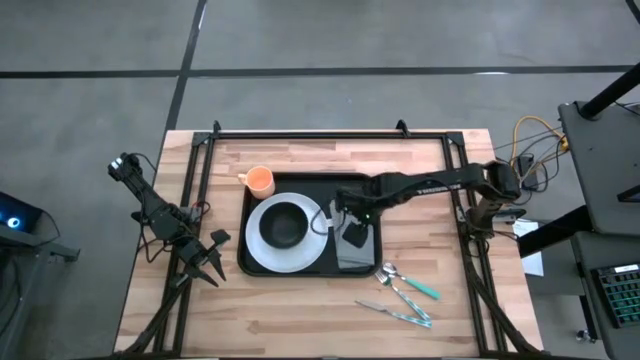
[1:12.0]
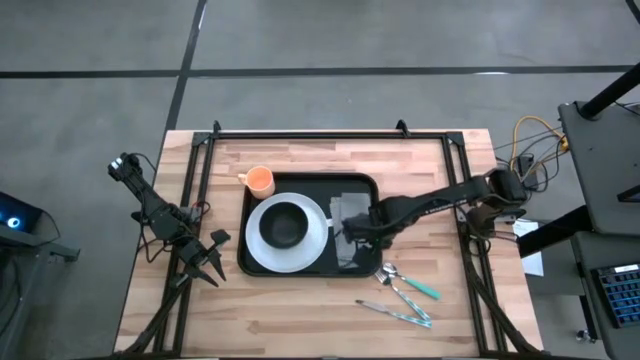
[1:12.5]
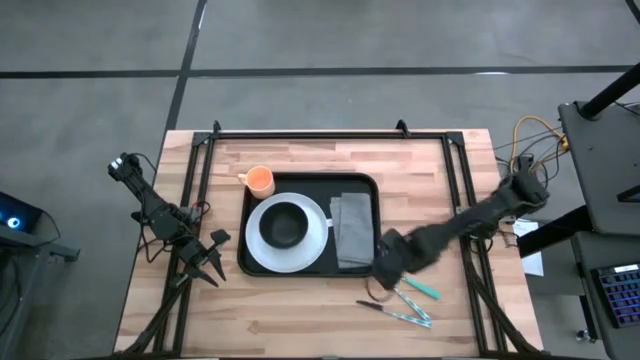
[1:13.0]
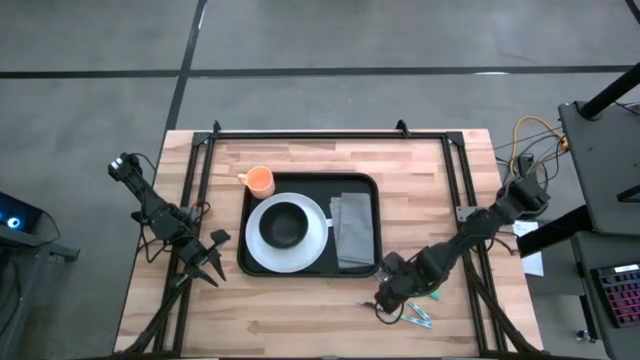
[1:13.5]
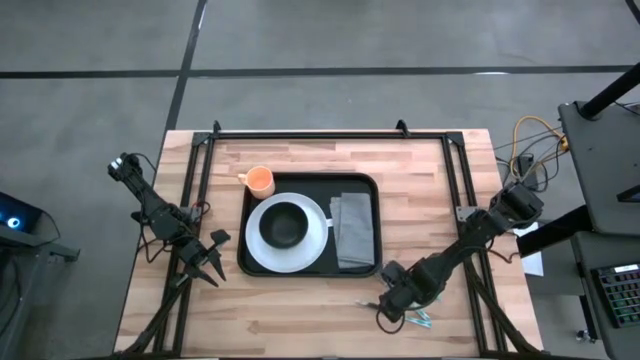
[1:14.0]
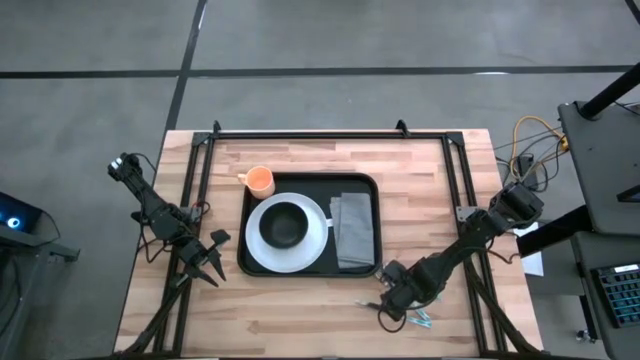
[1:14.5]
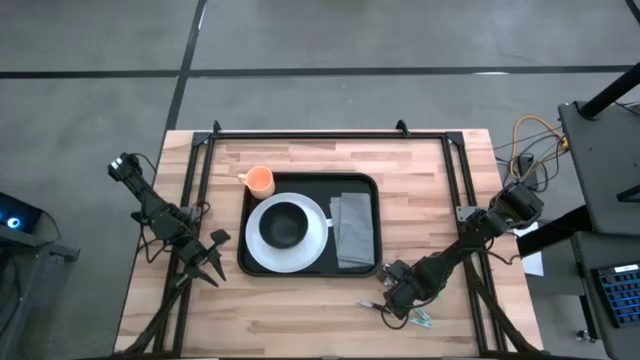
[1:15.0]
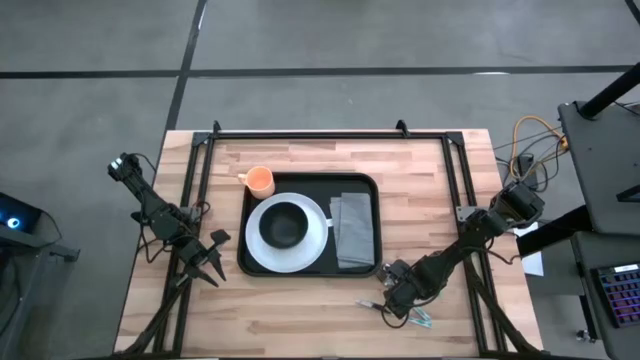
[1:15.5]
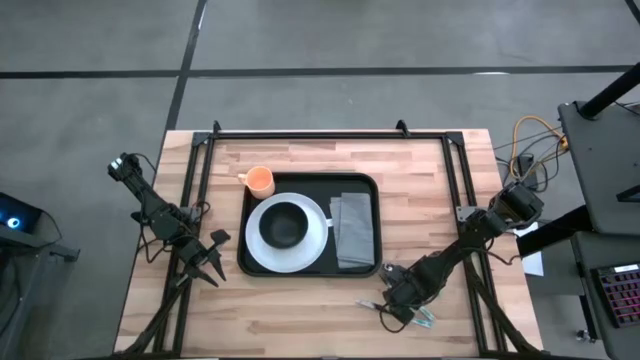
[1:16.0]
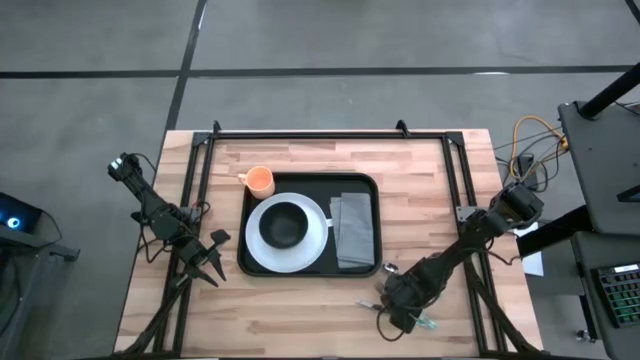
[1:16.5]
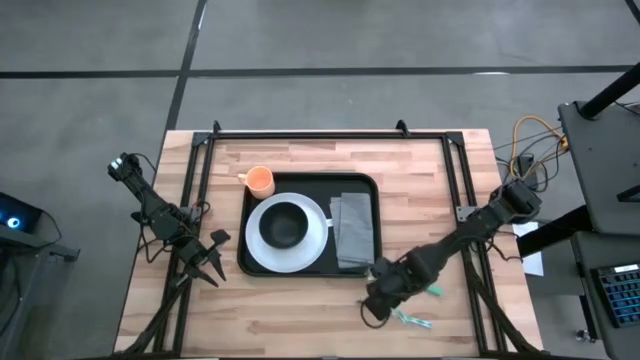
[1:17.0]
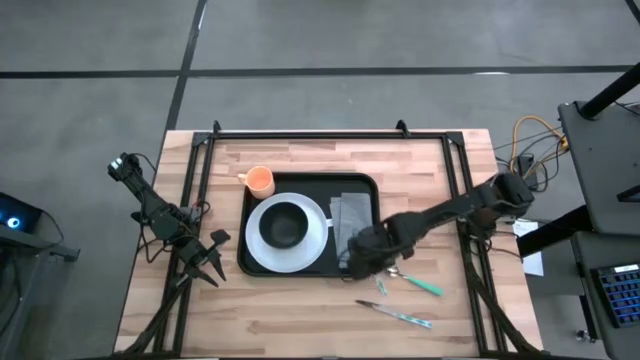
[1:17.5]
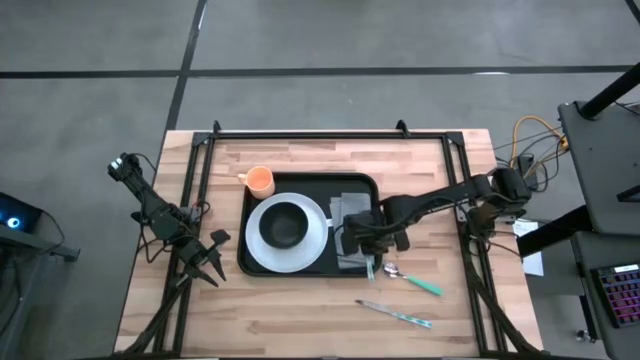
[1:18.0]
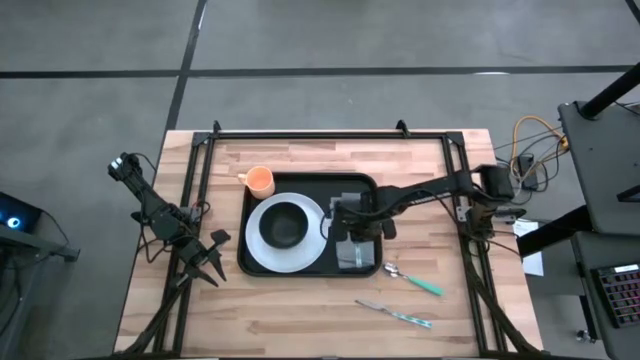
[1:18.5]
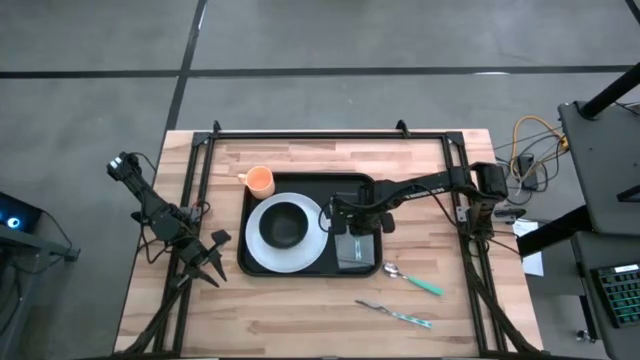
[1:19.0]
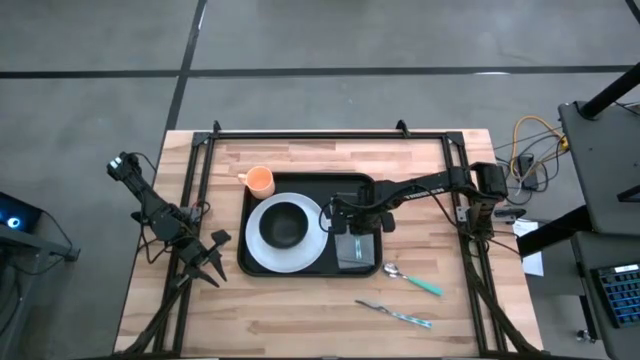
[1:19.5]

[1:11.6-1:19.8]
Task: Set up tray
Put the fork on top of the napkin in the serving tray

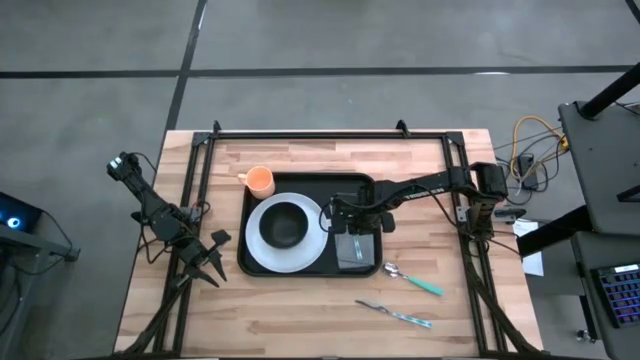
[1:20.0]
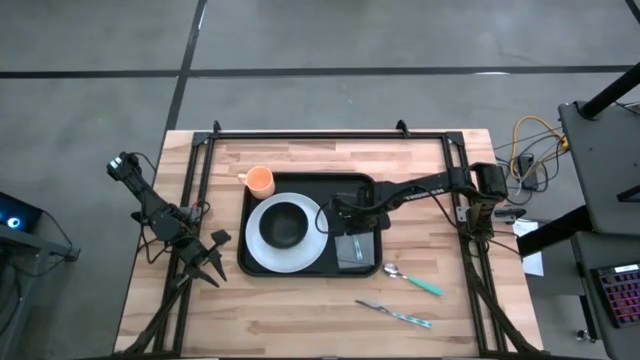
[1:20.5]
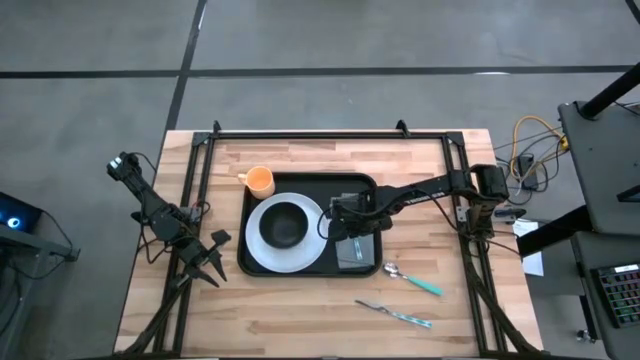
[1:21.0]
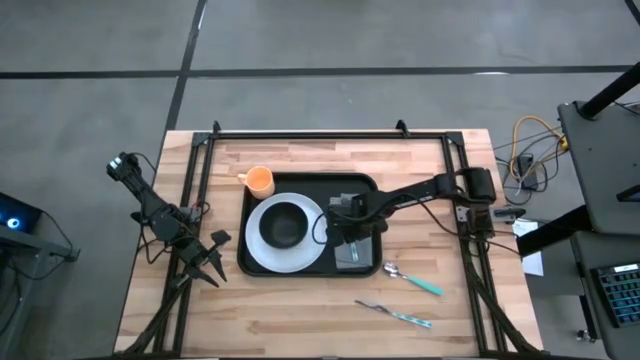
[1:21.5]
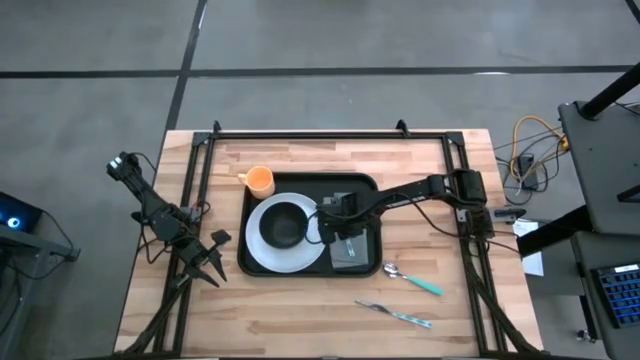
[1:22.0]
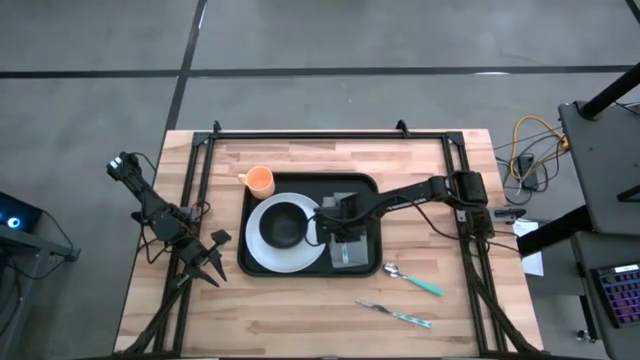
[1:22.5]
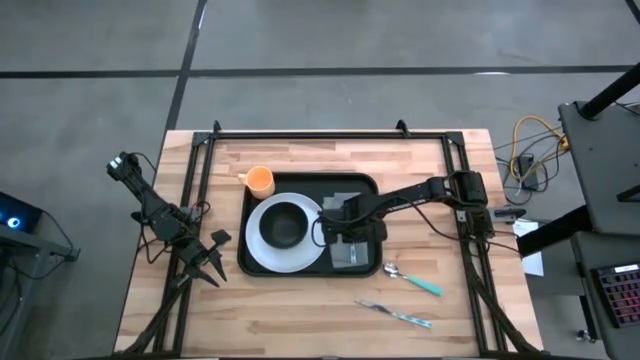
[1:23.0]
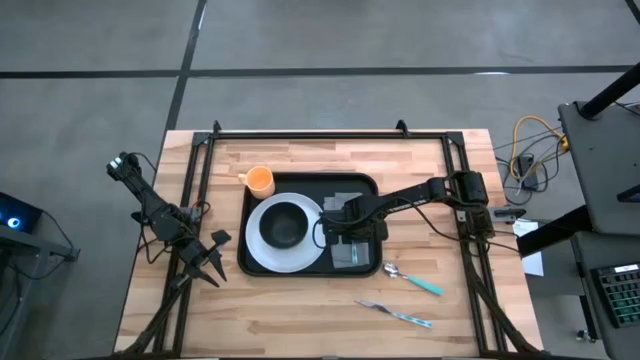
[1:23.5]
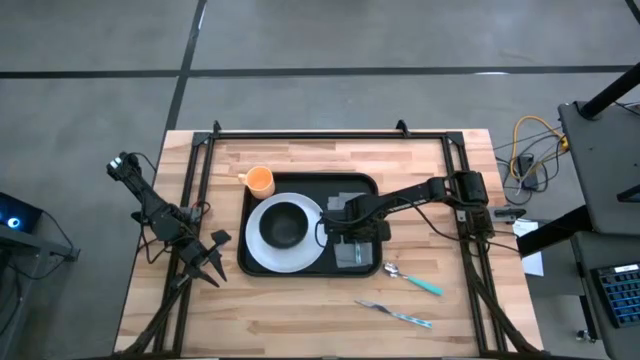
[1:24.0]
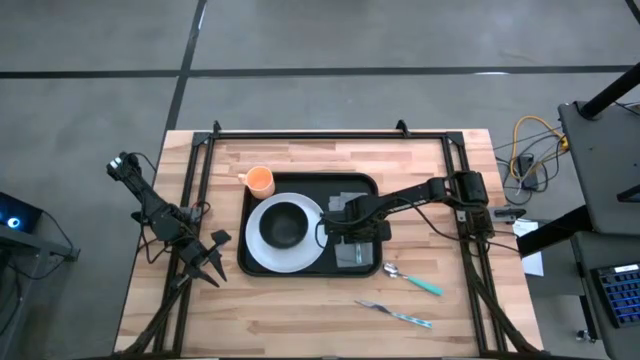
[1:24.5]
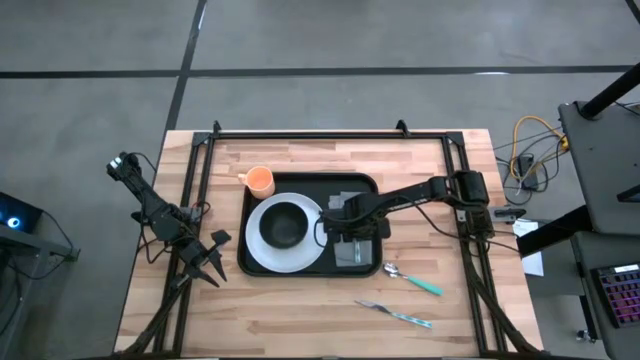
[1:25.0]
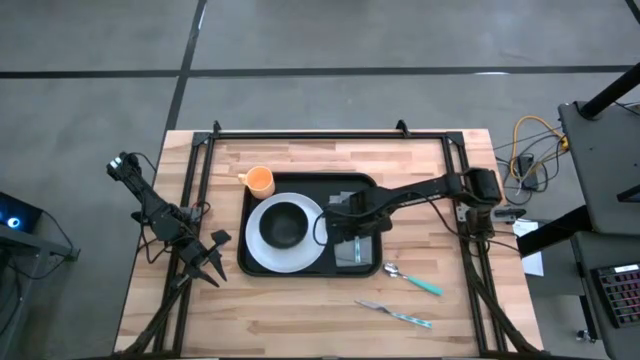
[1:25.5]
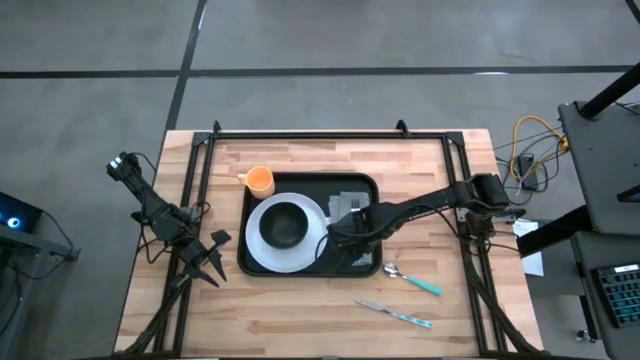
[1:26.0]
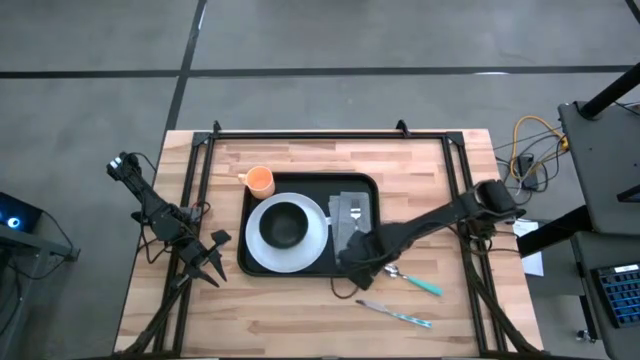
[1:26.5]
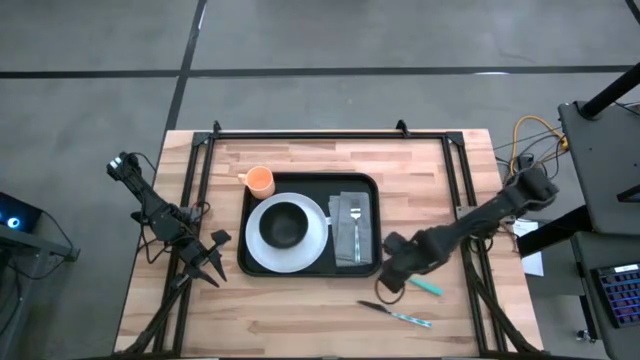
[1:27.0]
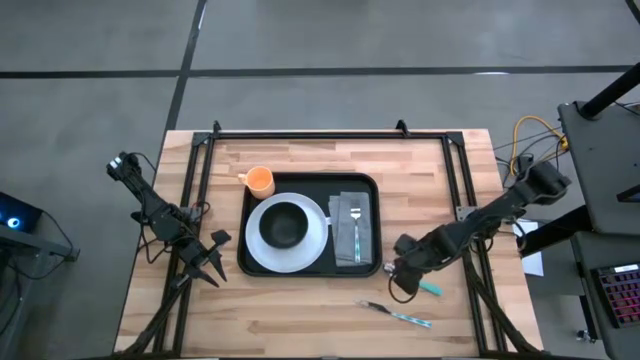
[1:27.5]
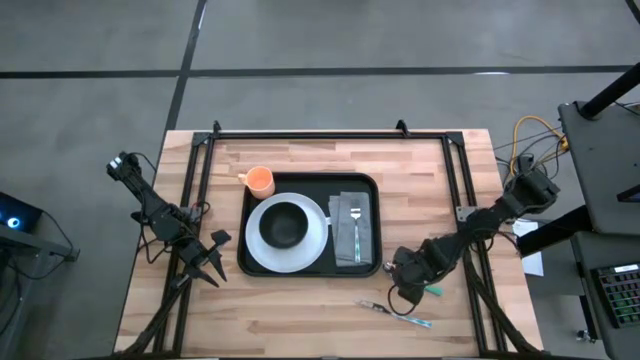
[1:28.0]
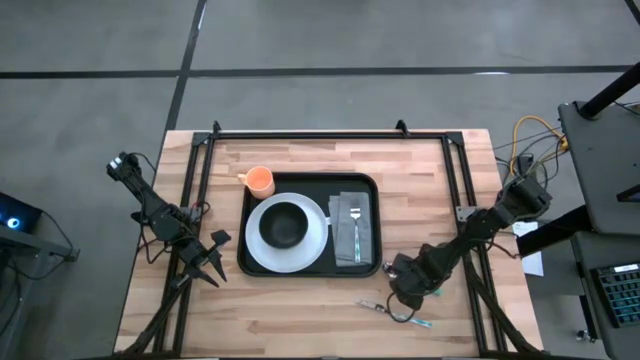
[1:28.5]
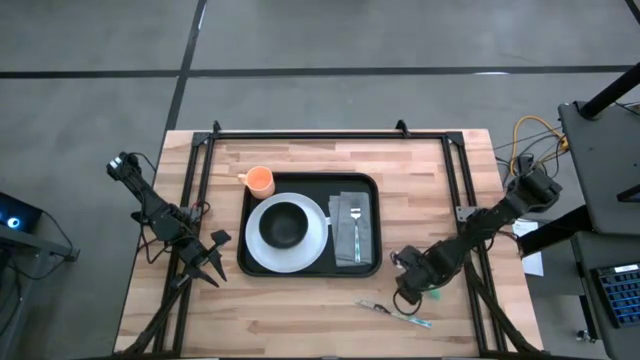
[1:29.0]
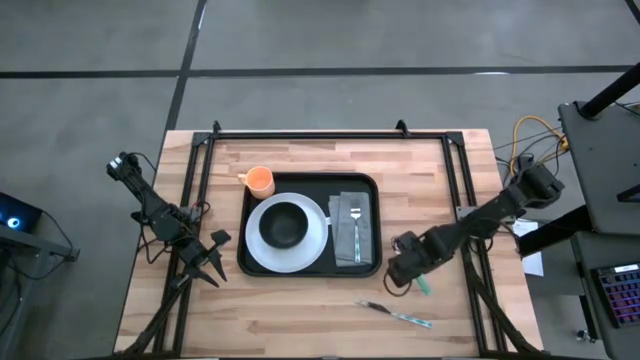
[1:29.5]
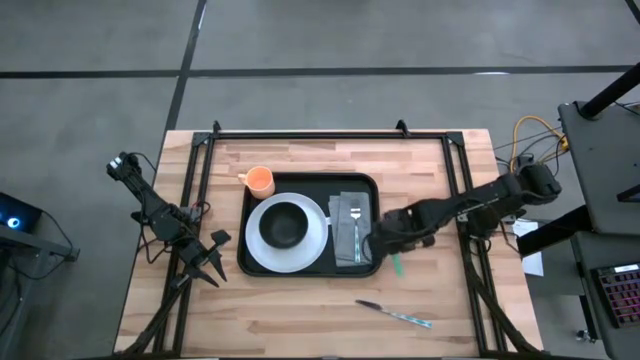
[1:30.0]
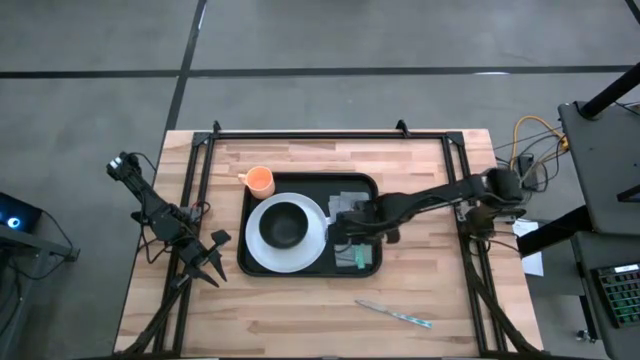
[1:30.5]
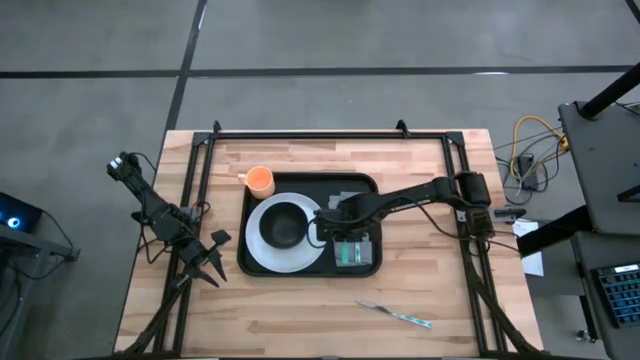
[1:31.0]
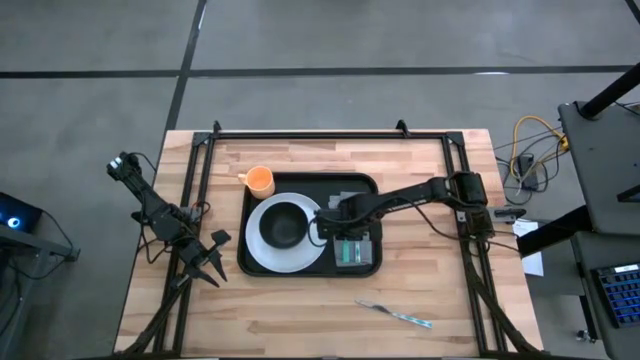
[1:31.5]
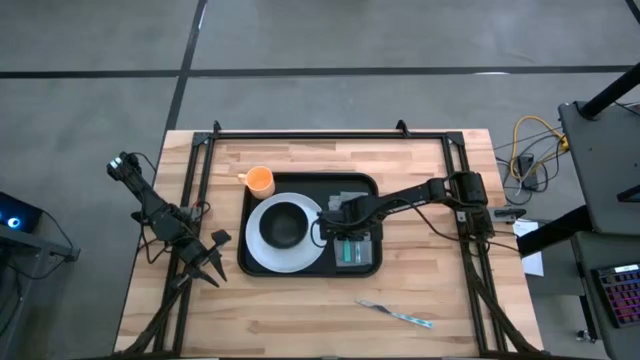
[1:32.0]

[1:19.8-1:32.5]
Put the spoon on top of the napkin on the left of the fork
